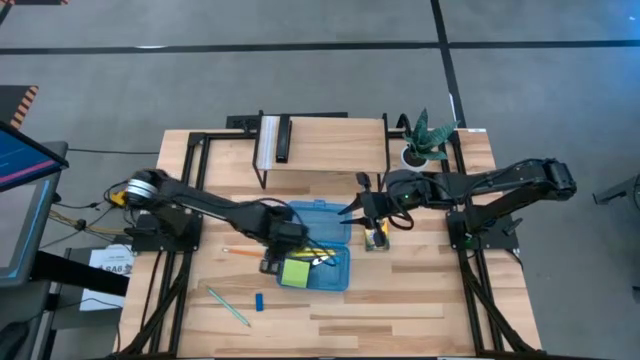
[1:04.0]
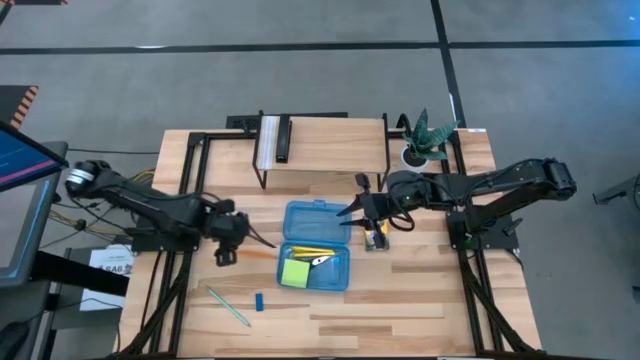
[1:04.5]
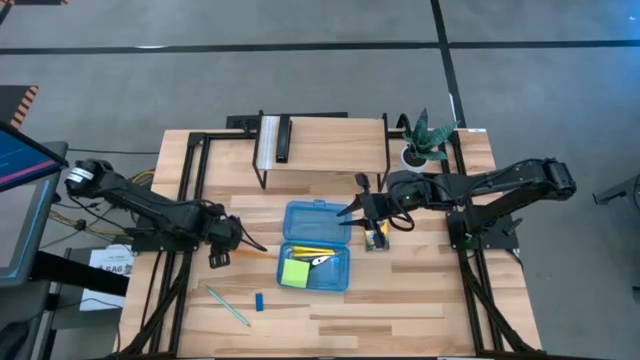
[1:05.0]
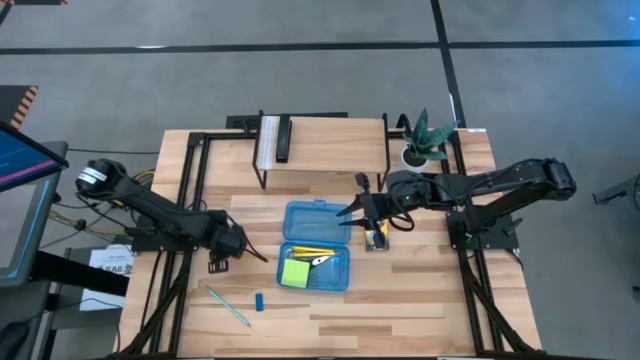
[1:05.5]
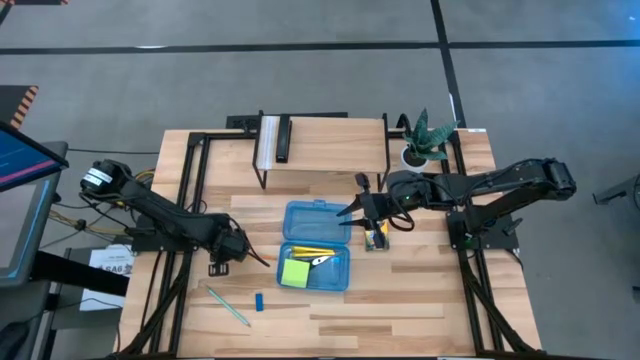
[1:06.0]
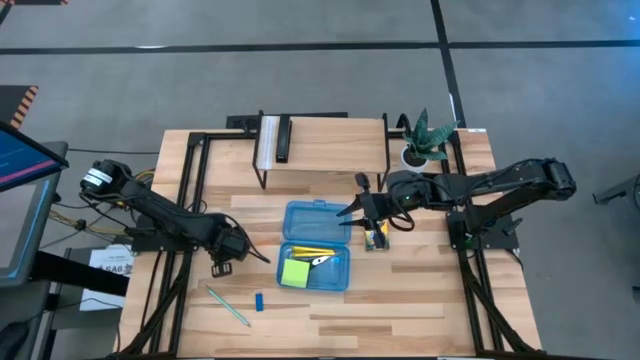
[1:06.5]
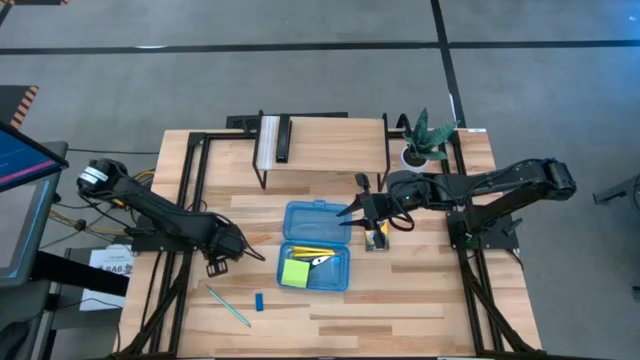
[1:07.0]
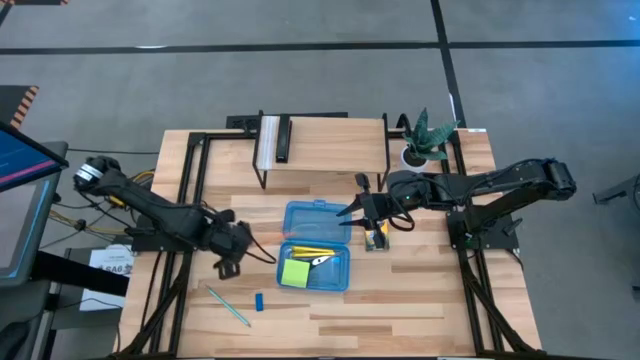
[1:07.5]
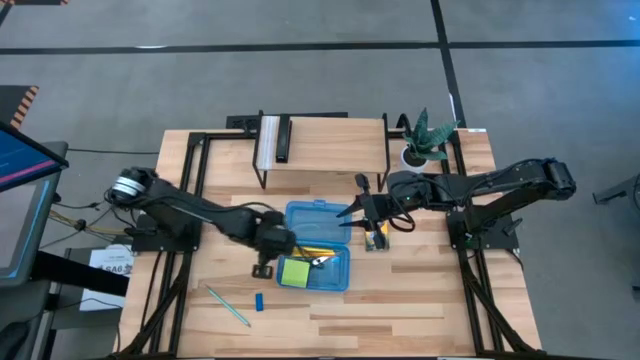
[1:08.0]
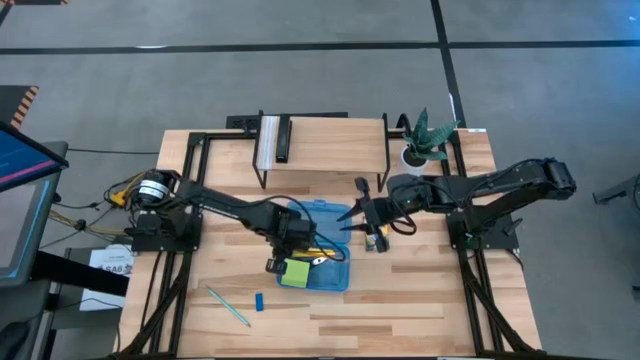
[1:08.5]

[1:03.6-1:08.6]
Task: Pack school essentials
Put the orange pencil into the blue supply box

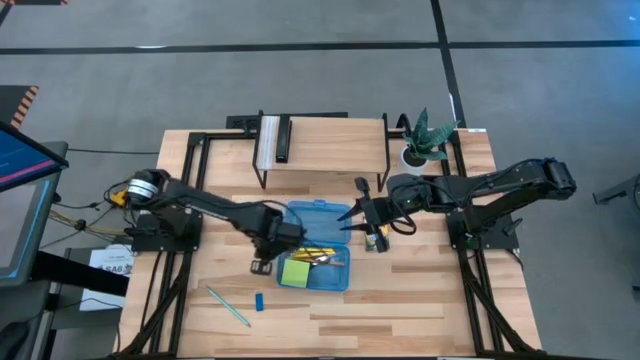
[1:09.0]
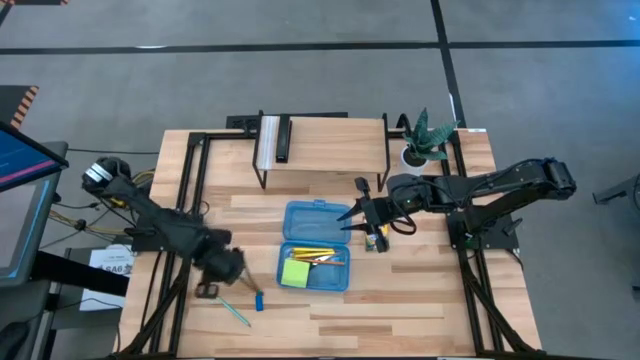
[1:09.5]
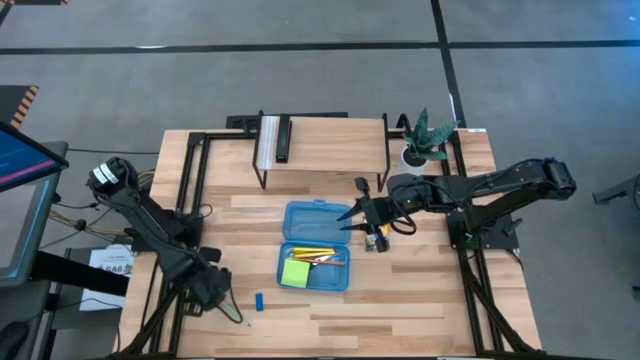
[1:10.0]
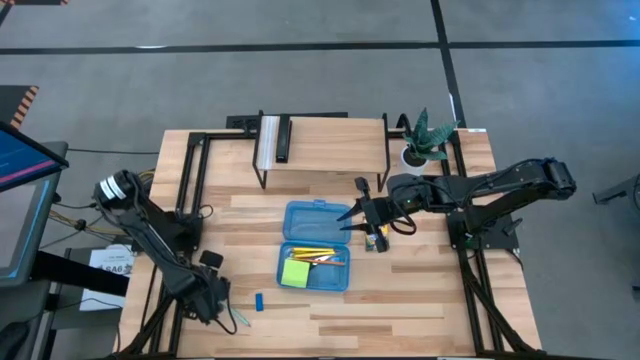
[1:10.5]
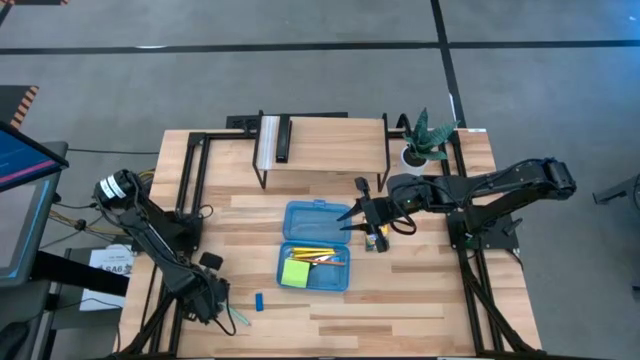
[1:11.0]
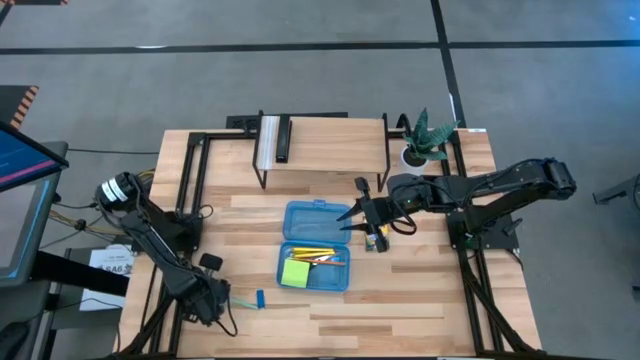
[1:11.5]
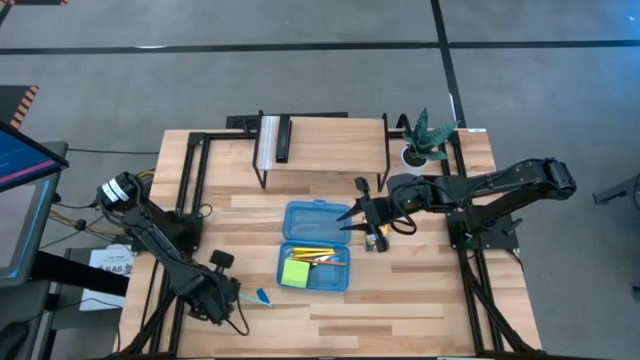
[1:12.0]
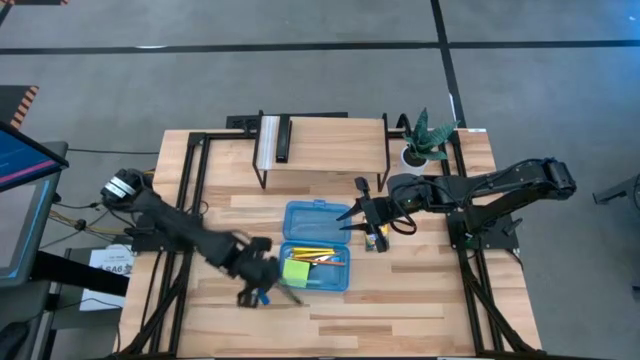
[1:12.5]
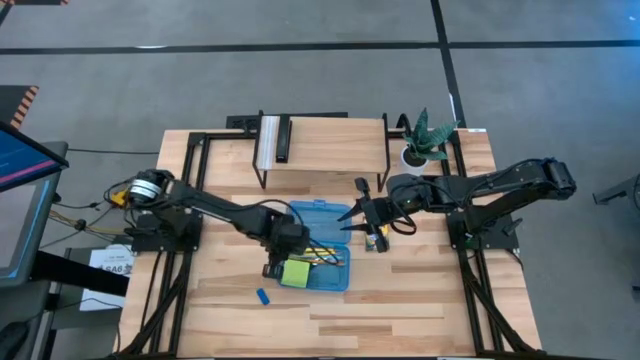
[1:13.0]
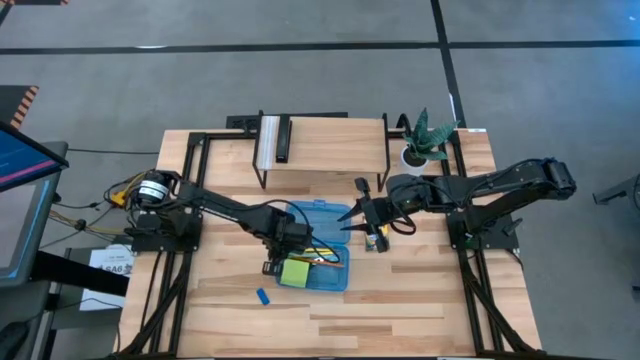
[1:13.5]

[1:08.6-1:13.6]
Put the blue pencil into the blue supply box

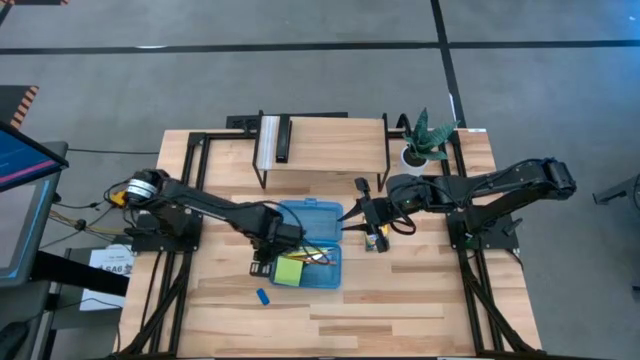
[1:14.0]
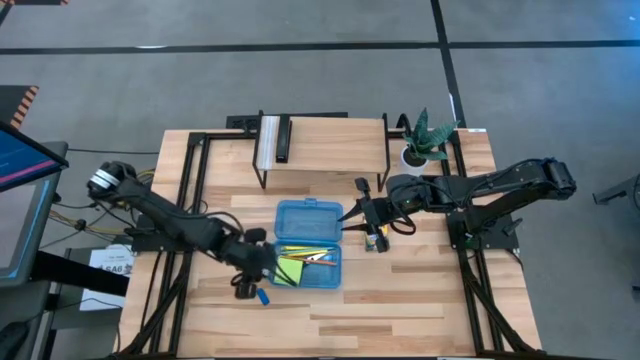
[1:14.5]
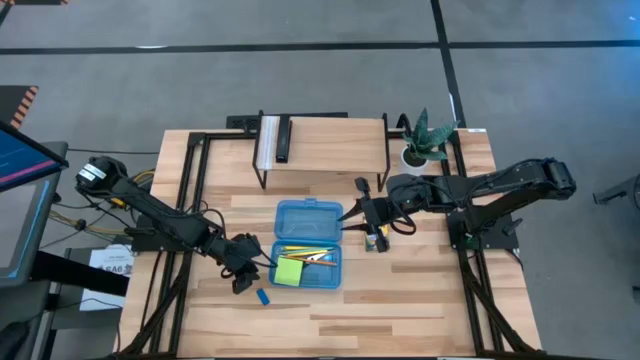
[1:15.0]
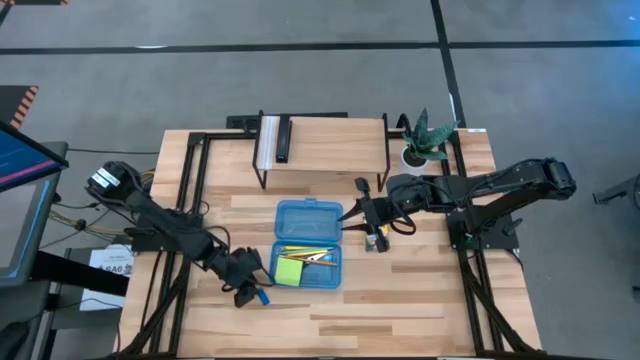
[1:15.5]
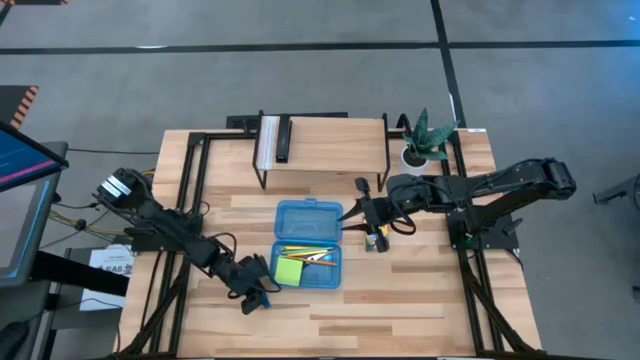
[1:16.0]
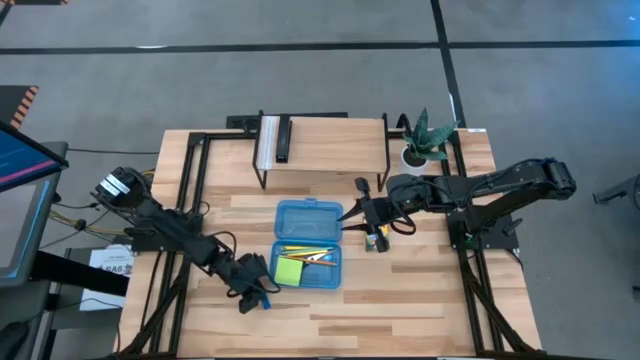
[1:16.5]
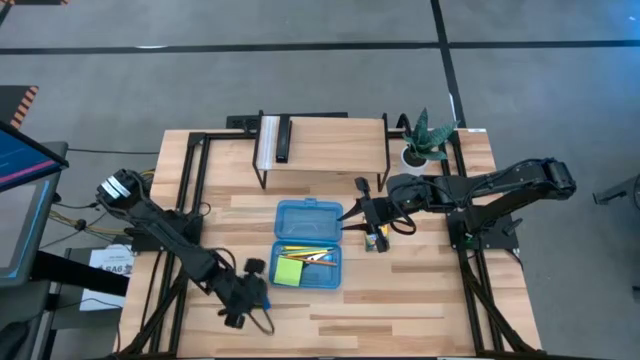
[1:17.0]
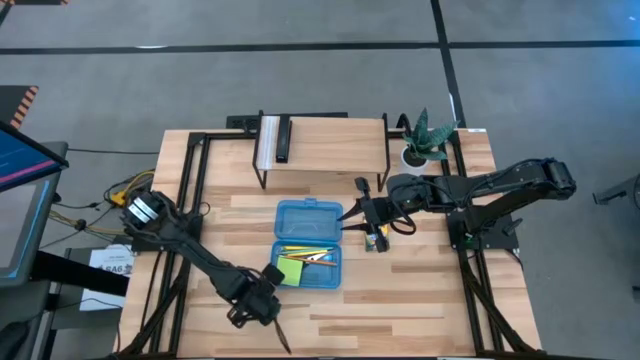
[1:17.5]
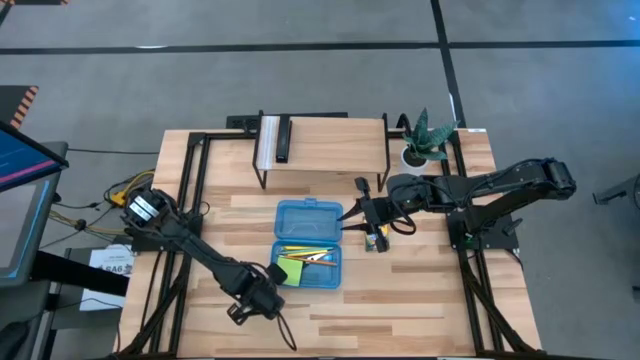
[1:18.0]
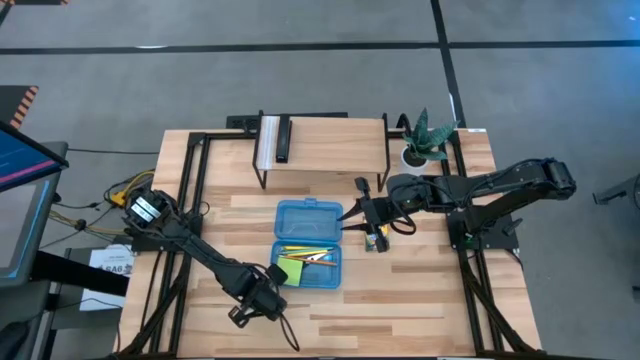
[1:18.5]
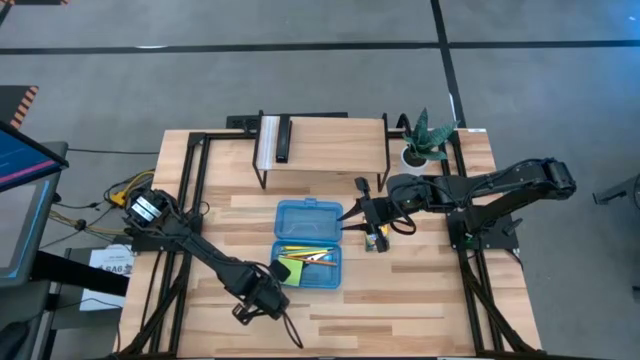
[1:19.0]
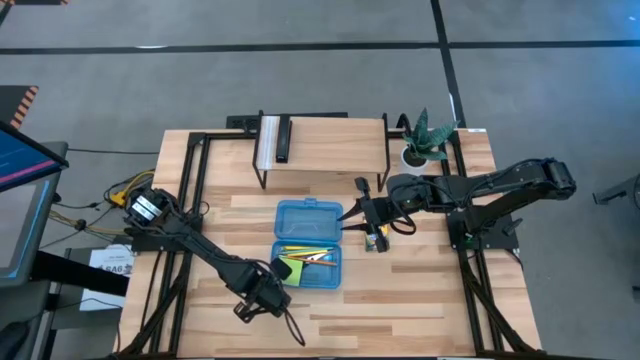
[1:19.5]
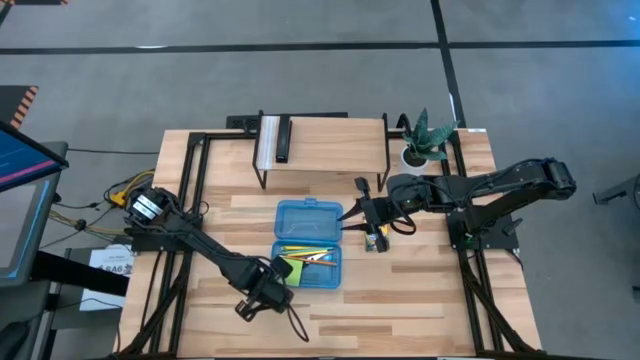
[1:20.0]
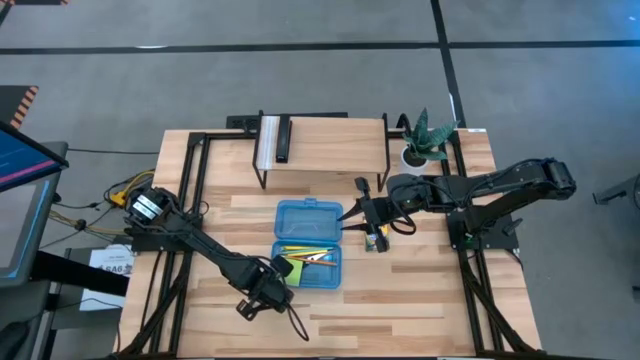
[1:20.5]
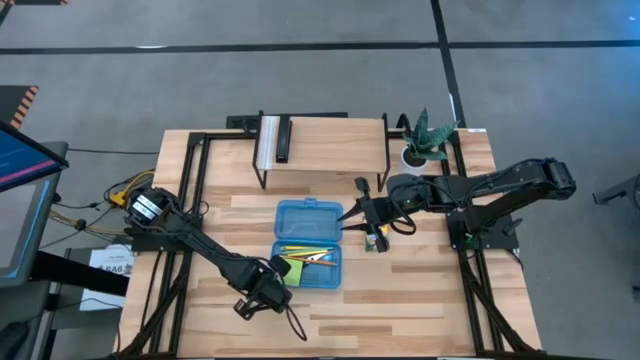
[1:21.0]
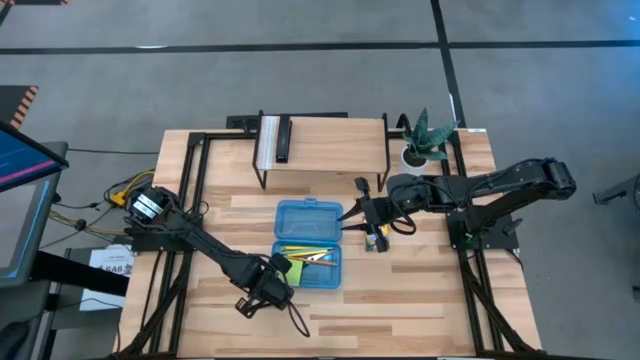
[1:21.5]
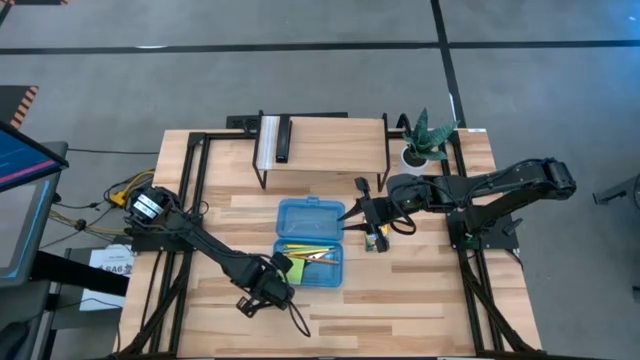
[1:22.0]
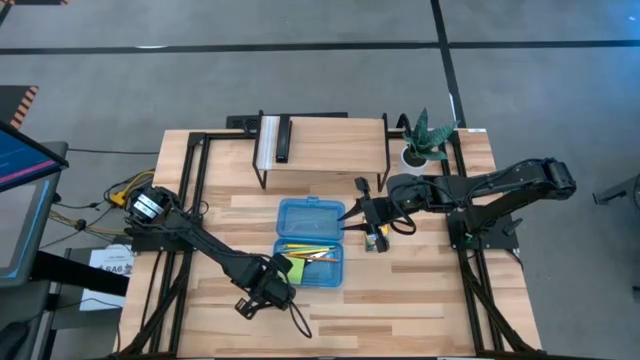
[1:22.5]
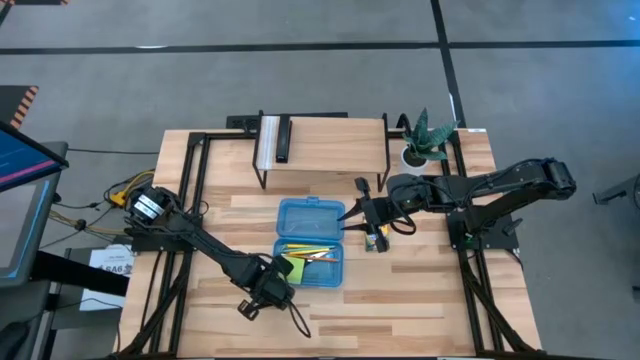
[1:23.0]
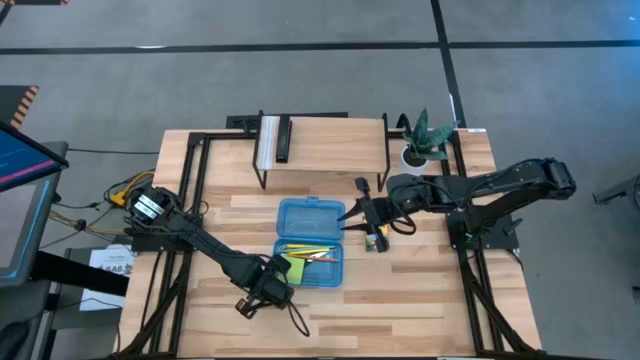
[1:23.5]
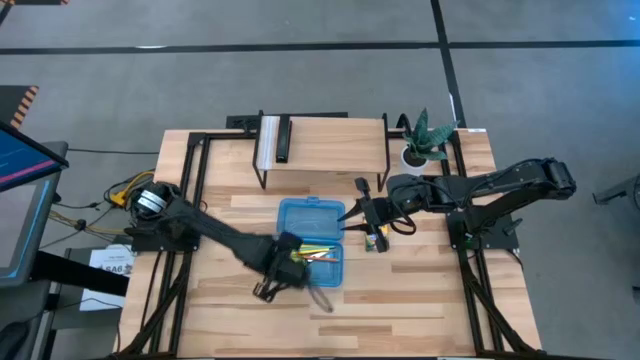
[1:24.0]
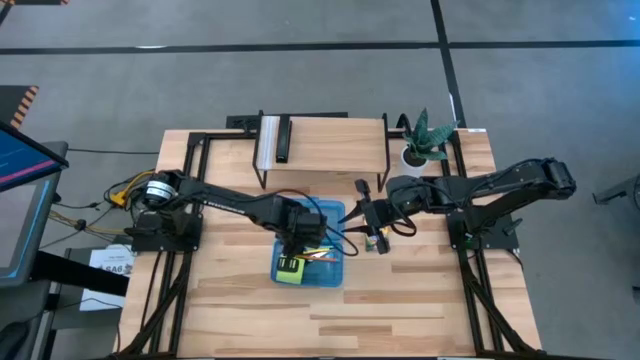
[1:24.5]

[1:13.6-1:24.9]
Put the blue eraser into the blue supply box
